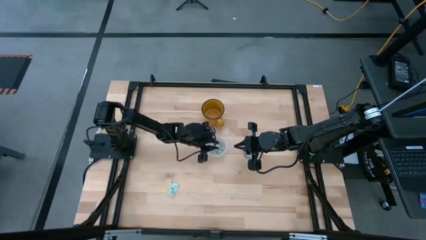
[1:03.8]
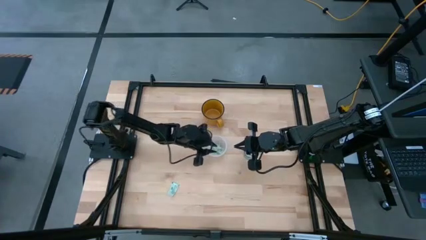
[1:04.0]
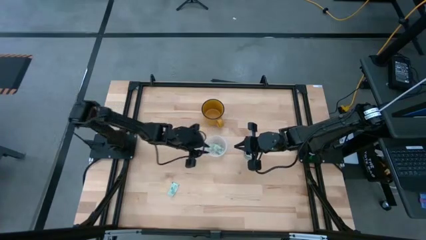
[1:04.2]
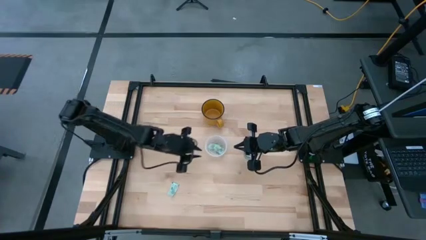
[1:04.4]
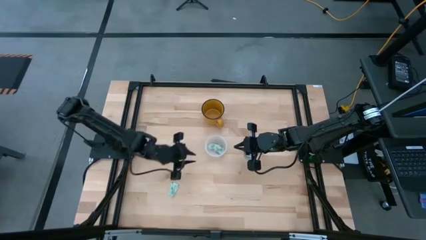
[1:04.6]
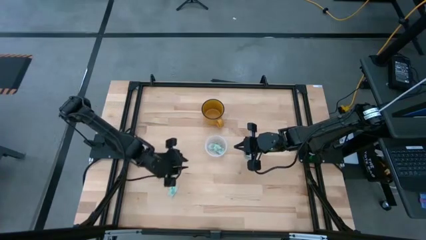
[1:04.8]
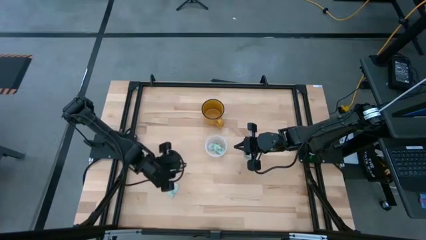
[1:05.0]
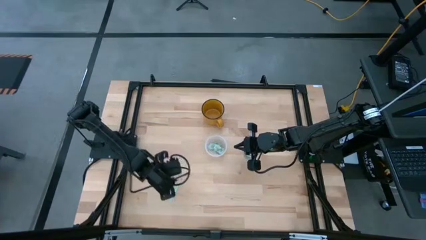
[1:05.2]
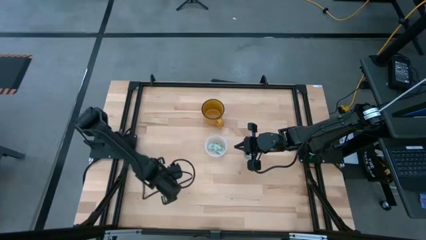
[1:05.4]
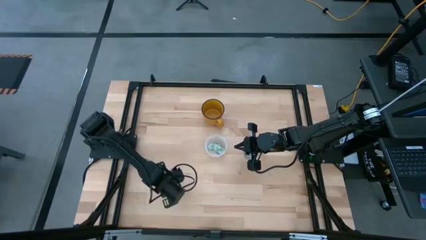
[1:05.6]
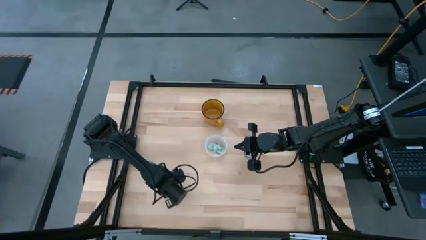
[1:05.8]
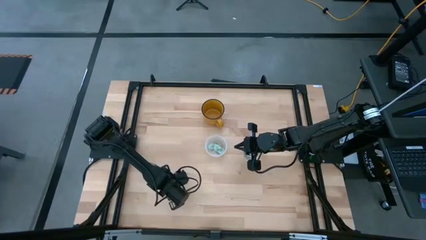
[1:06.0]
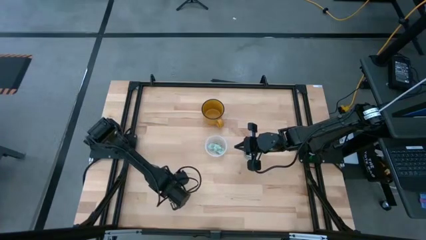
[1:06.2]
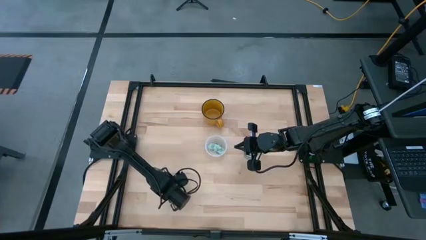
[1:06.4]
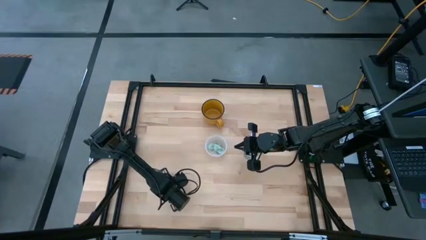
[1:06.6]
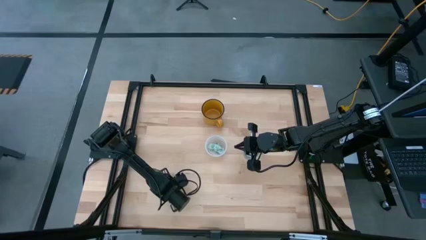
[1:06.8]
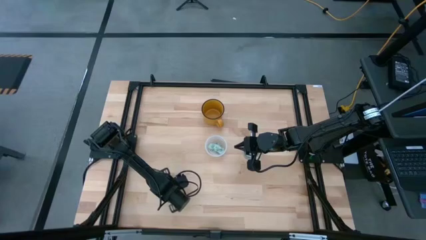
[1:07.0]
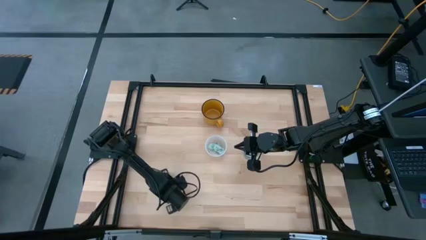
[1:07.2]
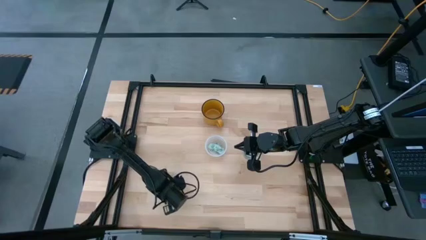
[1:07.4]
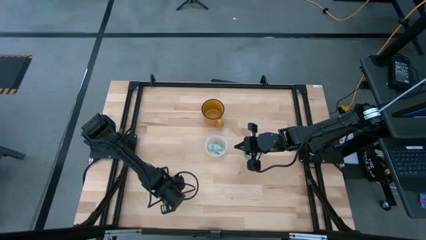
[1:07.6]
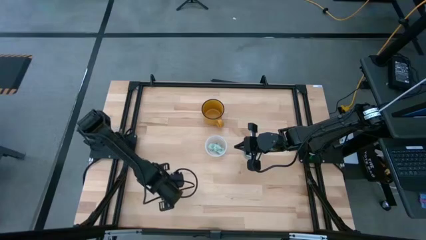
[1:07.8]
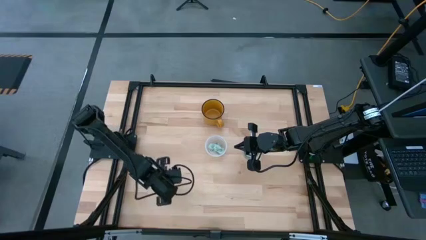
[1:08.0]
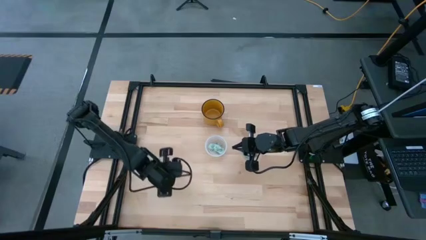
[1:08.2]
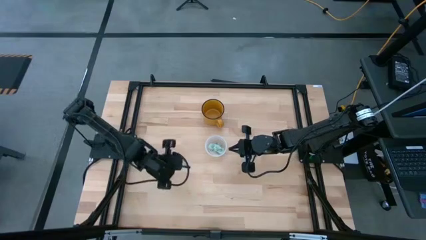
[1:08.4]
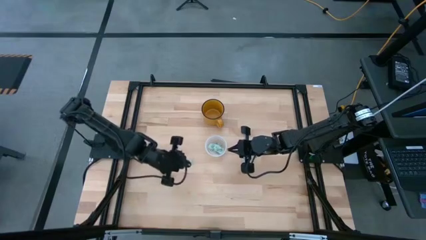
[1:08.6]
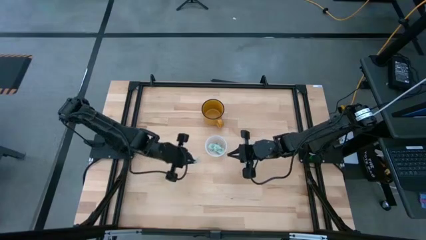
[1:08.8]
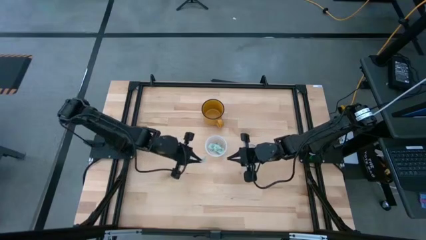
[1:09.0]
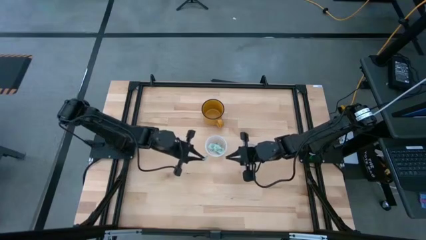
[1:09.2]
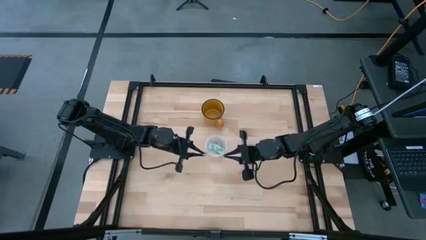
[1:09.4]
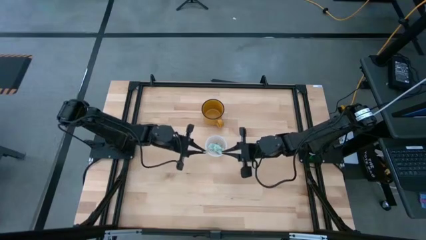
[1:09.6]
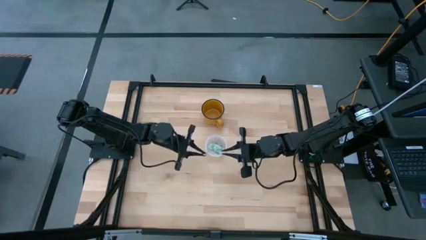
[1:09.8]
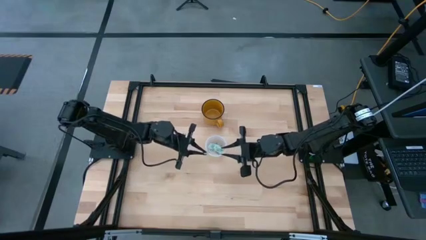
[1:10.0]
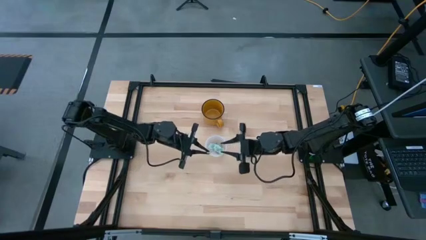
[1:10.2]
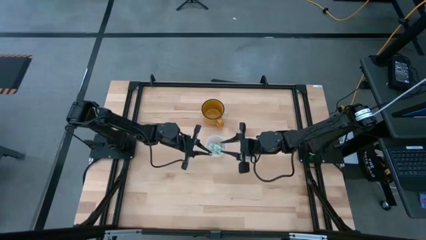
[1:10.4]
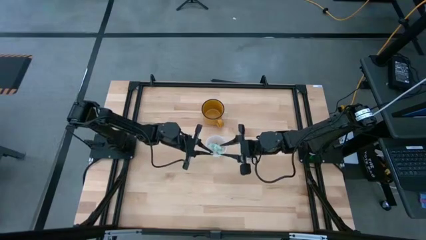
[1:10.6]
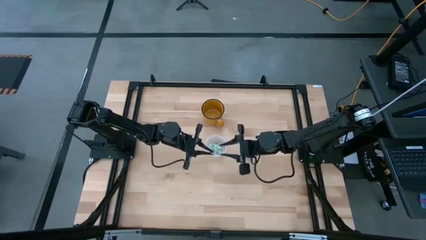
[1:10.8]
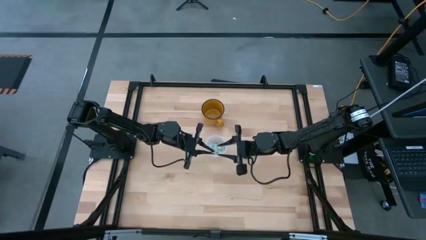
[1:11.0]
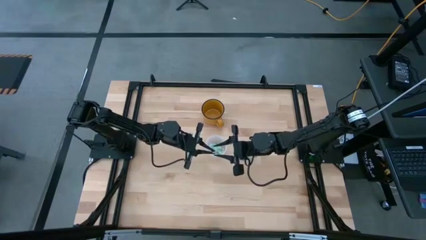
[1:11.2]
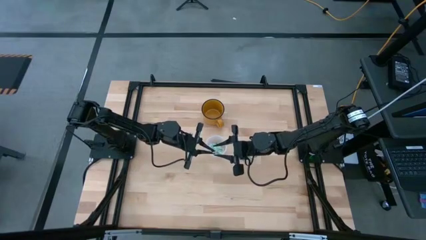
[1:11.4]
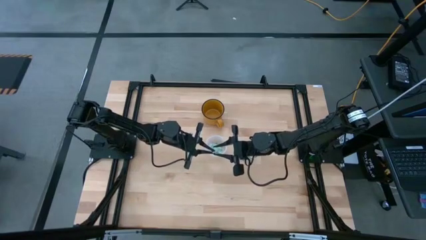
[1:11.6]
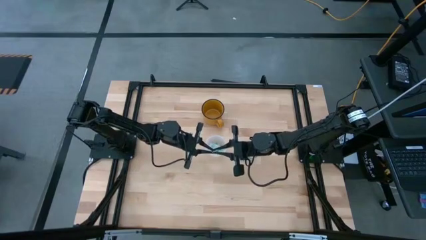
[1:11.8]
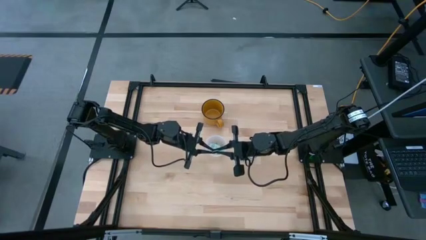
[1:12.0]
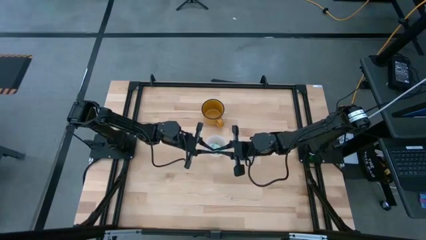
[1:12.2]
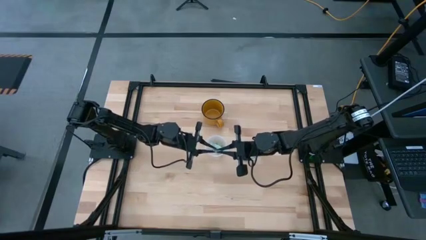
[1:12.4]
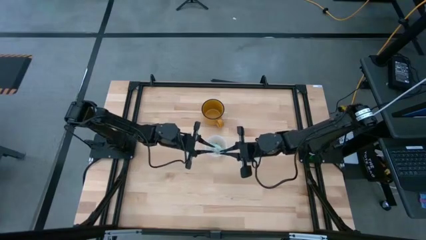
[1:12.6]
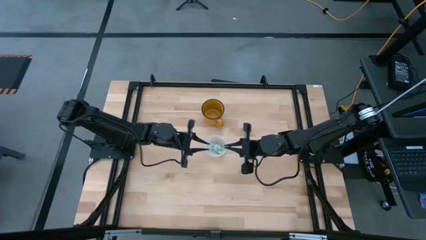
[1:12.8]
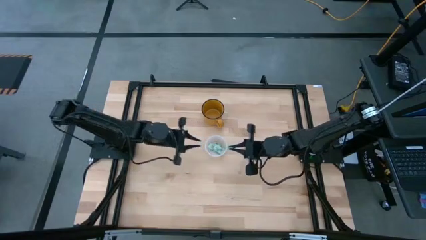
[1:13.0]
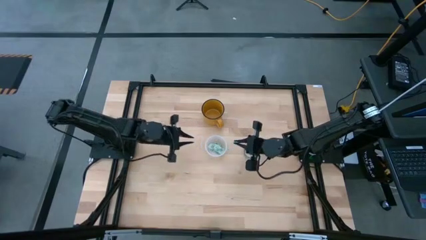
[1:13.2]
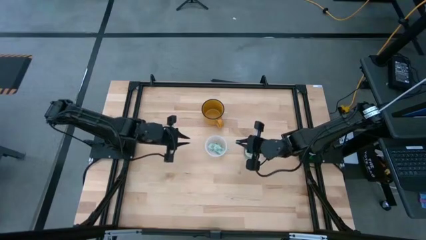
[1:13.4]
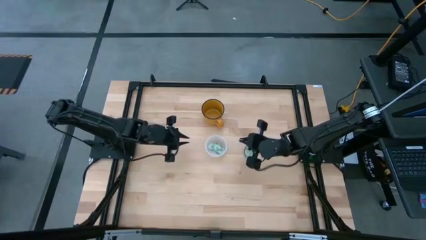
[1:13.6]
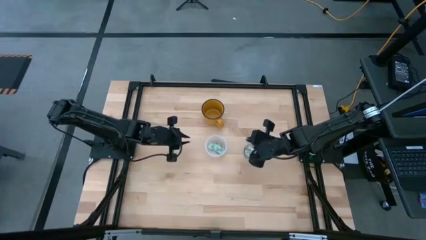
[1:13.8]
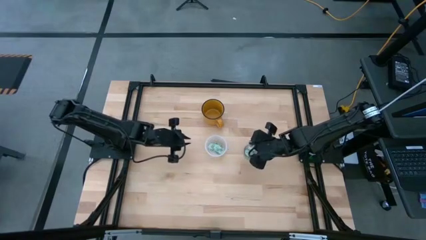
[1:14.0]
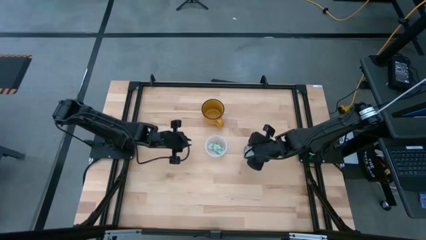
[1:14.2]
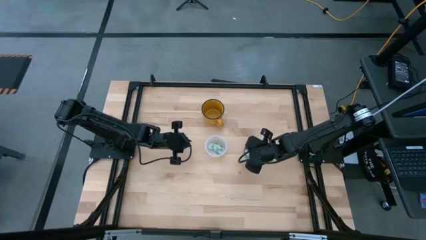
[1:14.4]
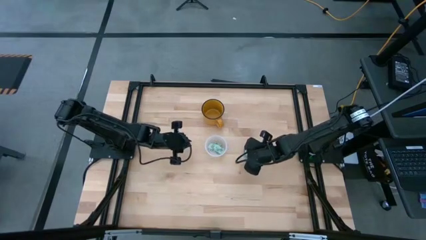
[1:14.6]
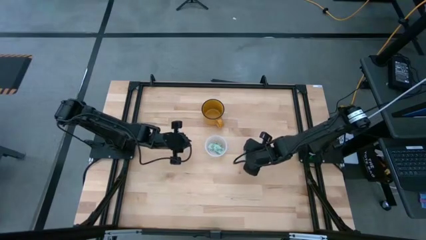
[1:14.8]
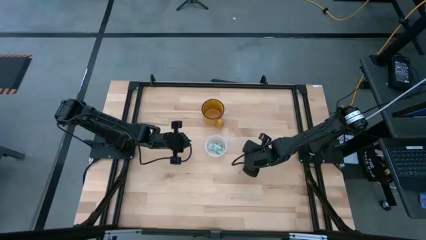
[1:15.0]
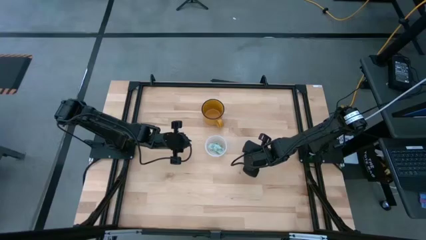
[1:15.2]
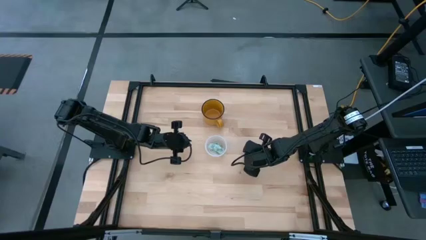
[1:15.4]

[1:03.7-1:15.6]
Task: Pick and place Stevia / Truvia into bins
Put the green stevia packet into the glass container

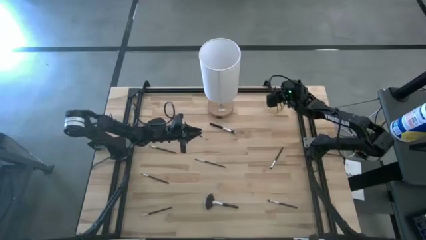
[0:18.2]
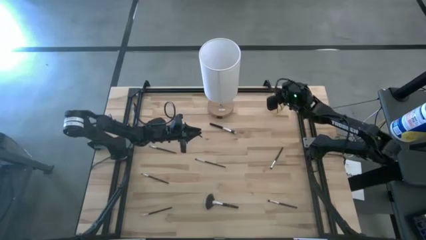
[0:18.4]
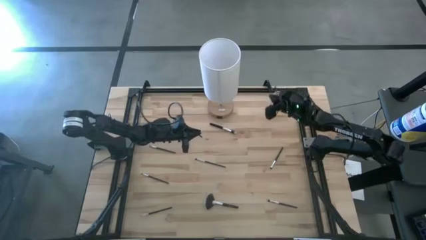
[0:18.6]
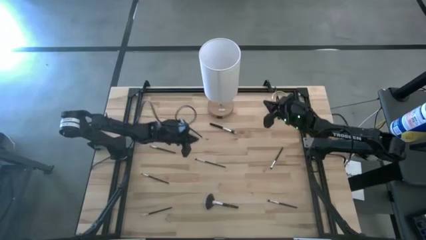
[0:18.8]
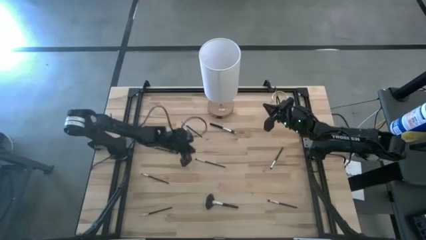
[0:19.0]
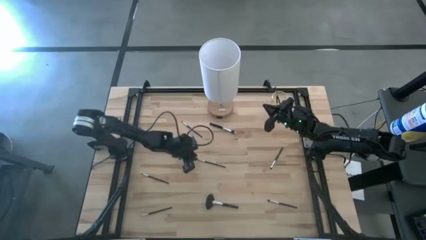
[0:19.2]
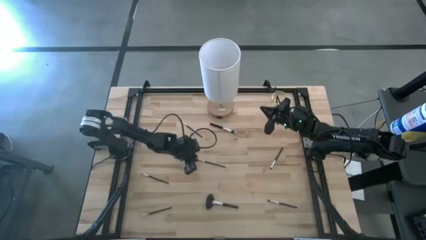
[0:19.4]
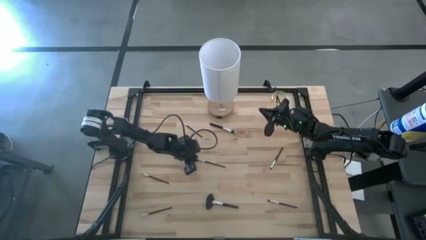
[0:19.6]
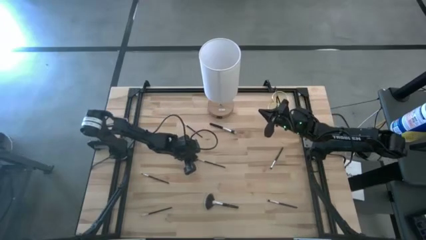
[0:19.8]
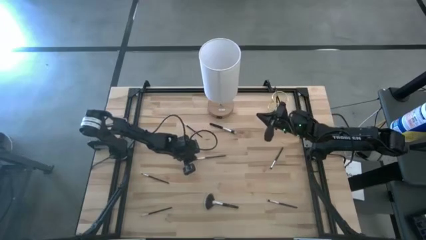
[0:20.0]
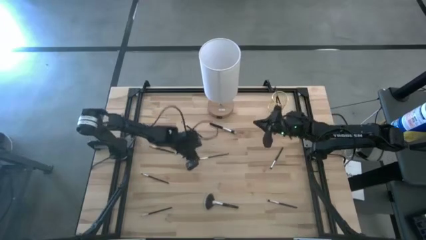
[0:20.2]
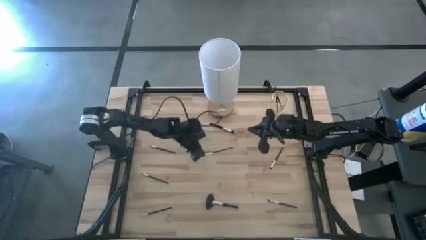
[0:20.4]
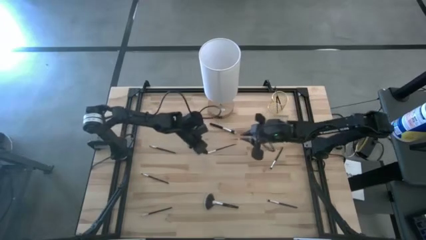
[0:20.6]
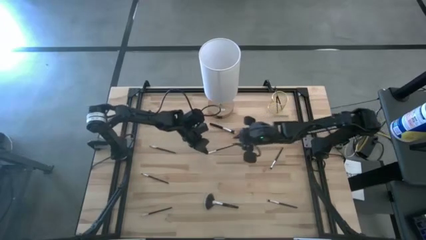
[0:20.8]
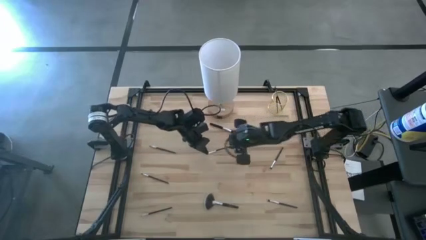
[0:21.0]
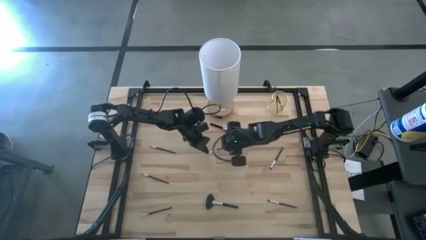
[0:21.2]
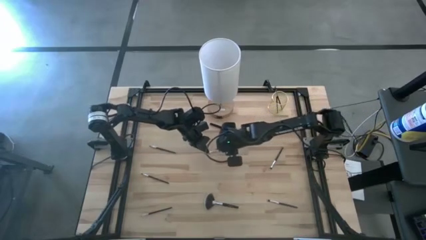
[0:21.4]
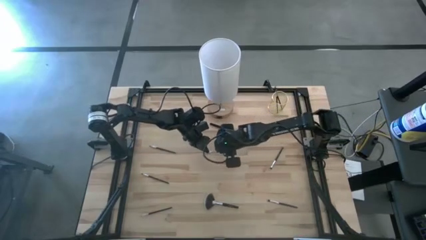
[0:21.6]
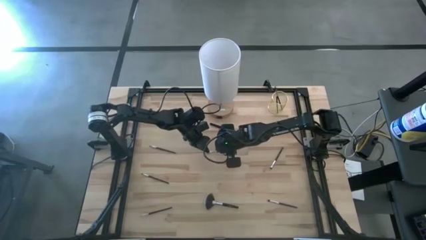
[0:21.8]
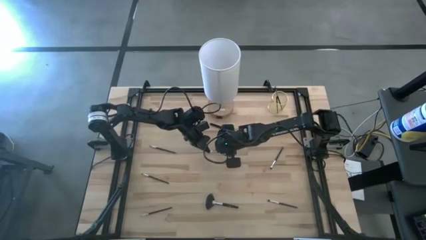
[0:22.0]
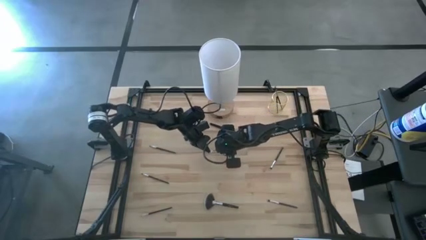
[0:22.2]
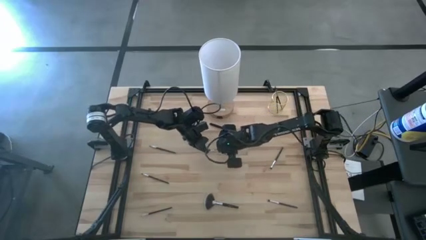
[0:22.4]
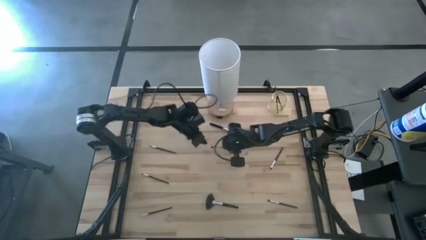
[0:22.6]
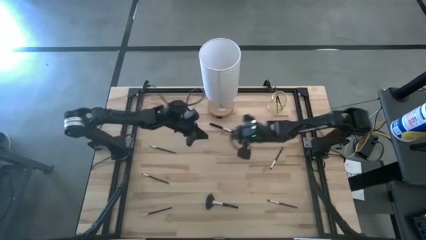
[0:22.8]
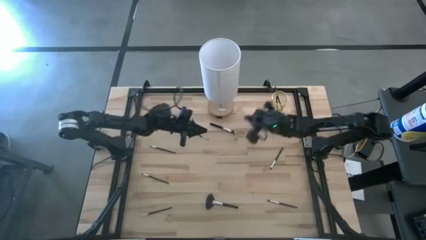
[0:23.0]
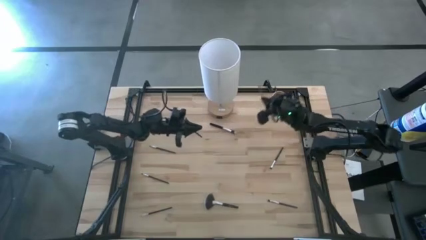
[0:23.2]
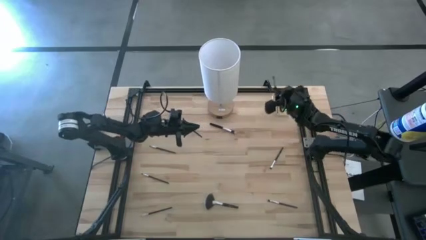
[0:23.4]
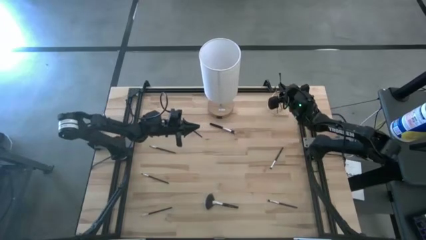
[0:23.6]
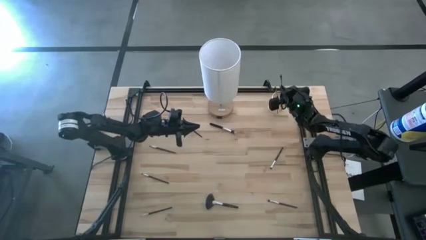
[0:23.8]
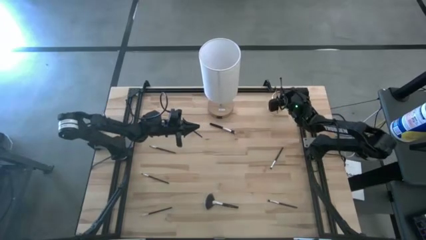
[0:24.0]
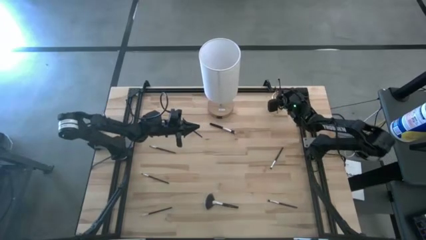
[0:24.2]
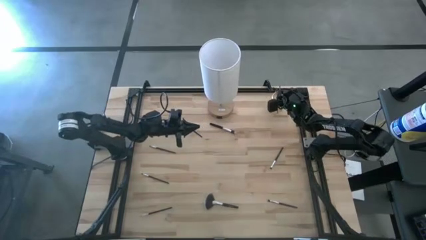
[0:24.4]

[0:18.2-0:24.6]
Task: Pick & Place Makeup Brushes
Put the eyeshadow brush into the makeup brush holder
